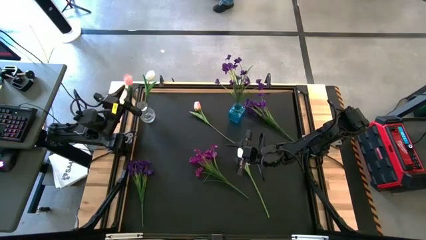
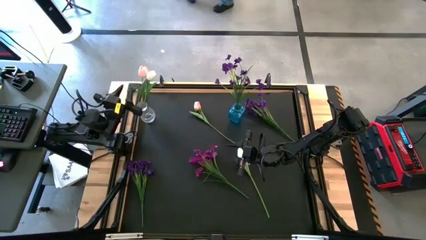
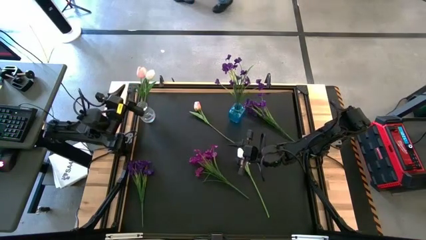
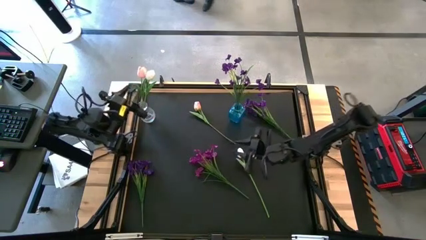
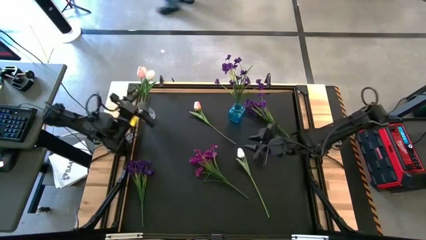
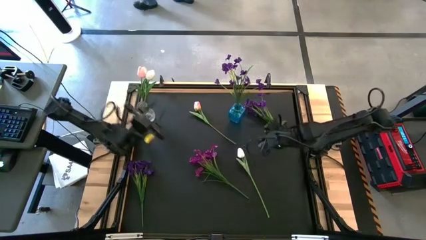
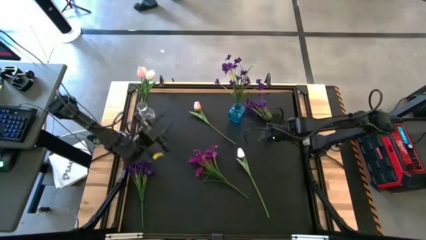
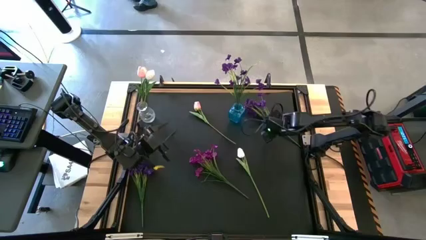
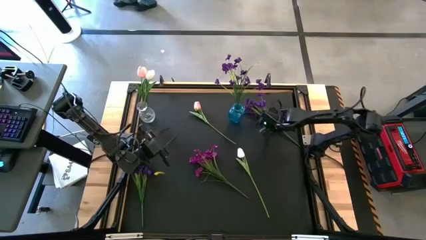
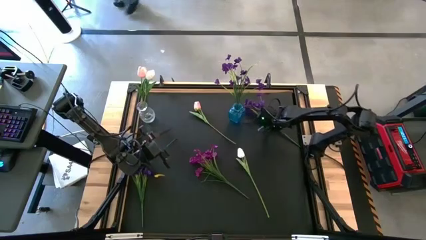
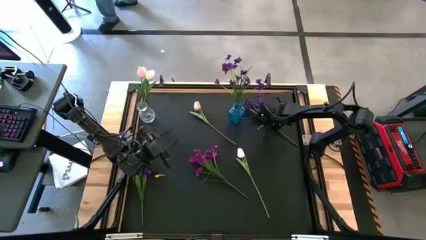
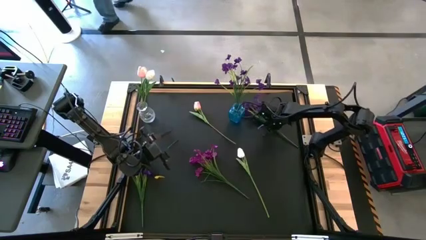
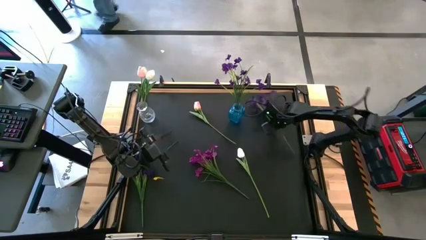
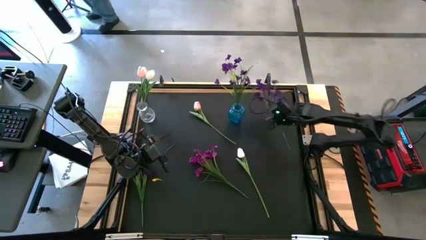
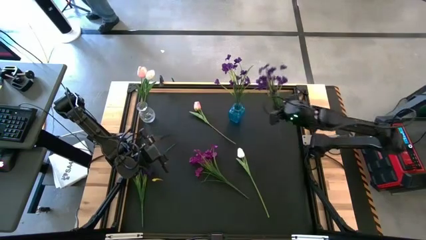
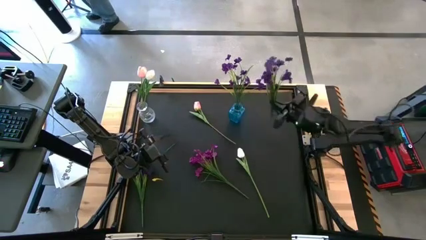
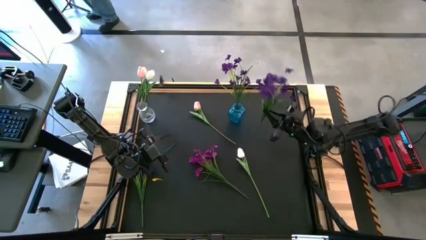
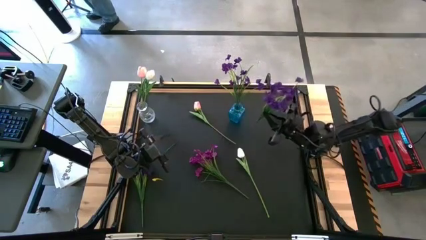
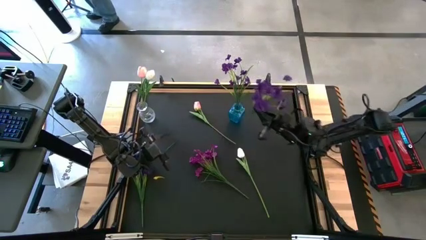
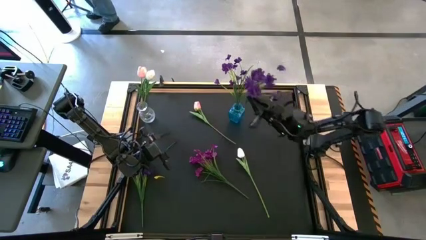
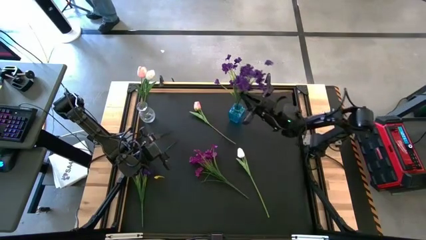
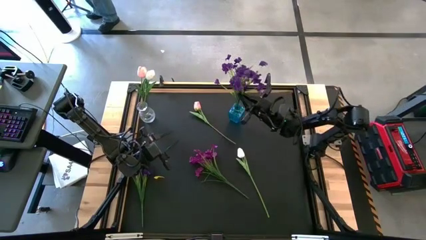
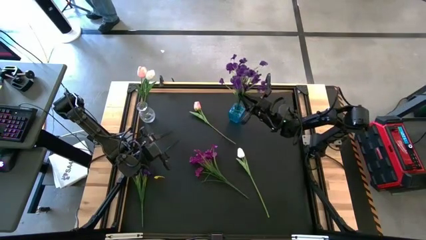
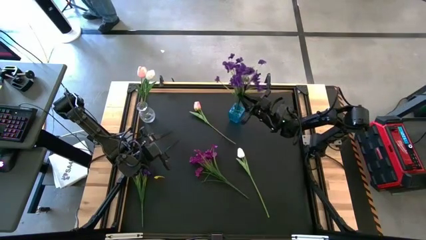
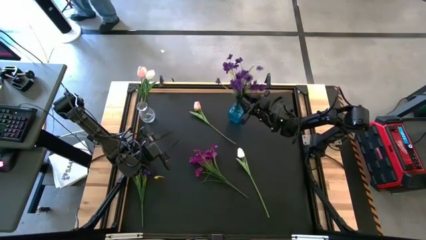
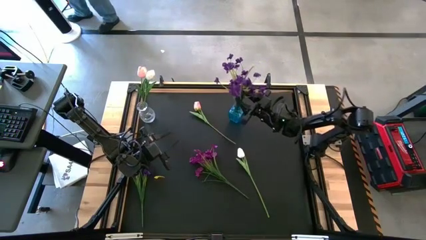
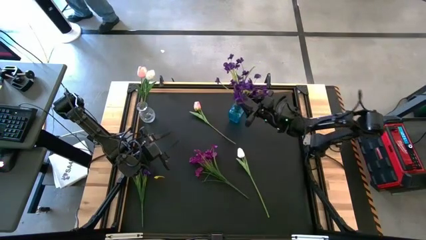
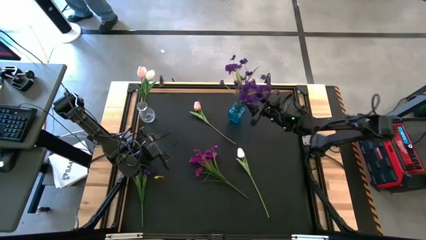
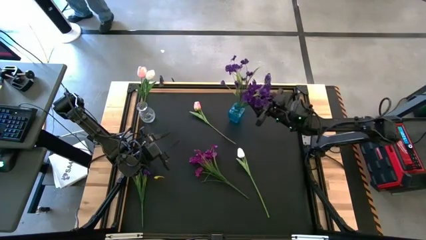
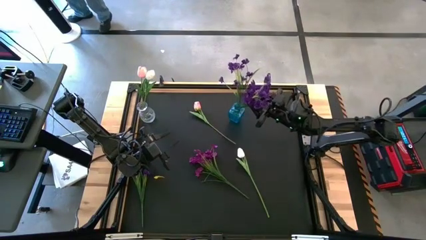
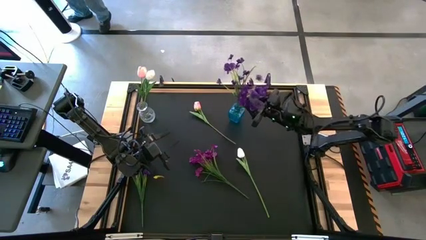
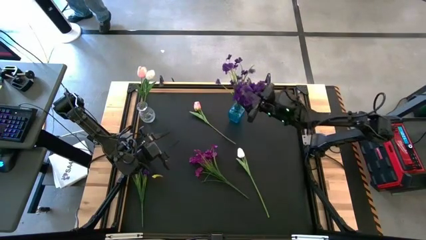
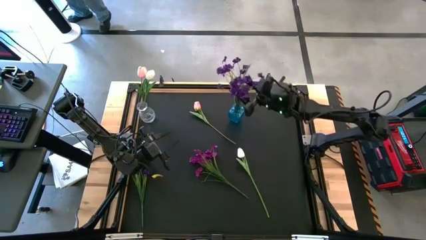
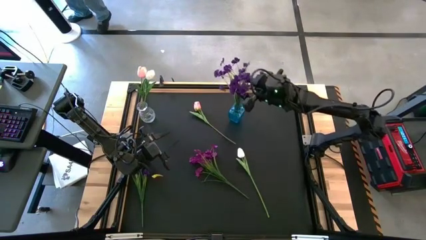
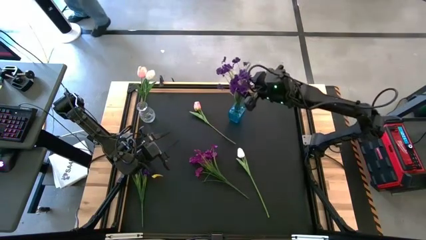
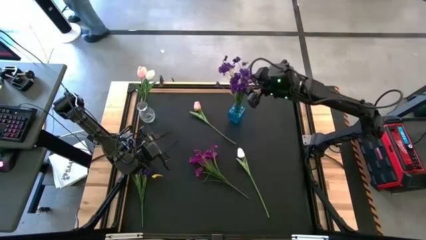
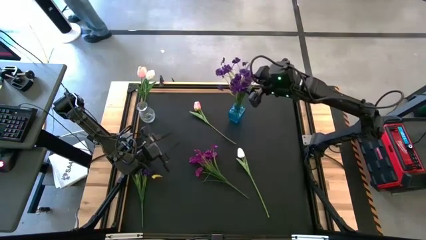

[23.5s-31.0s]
Task: Sort flowers into vase by color
Put the top violet flowers into the blue vase

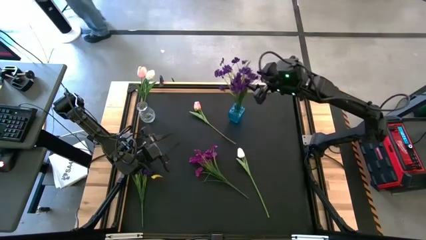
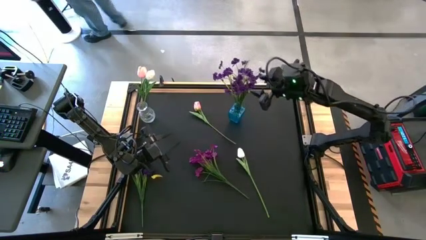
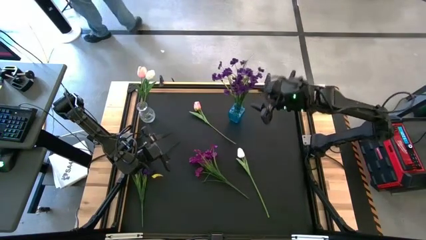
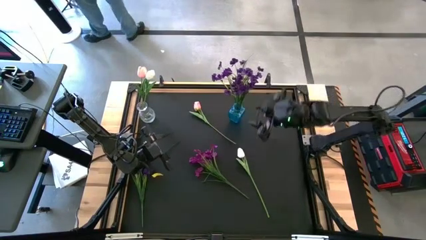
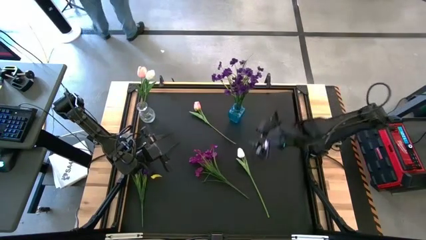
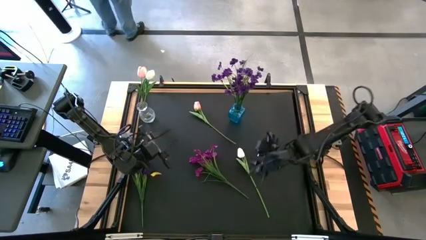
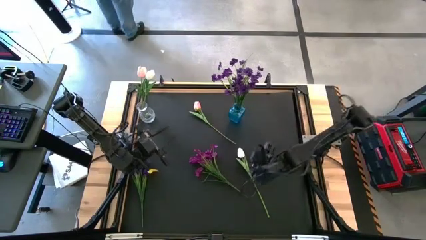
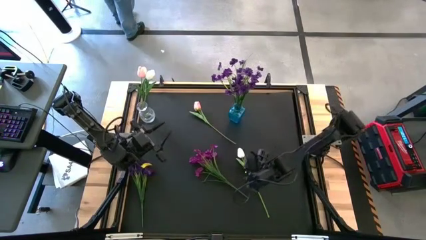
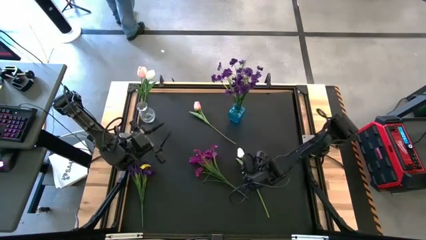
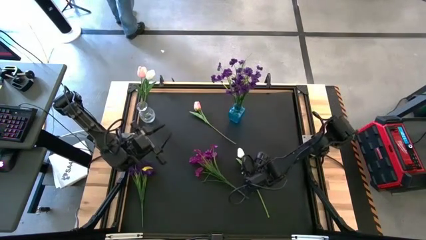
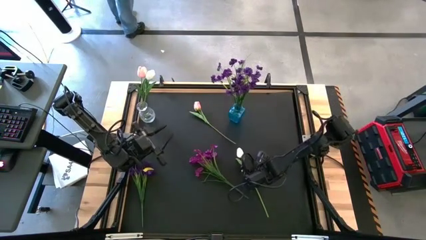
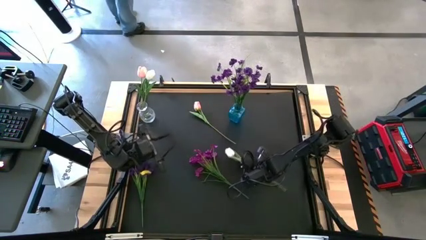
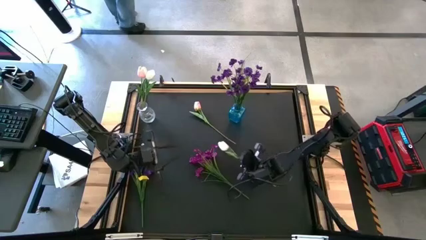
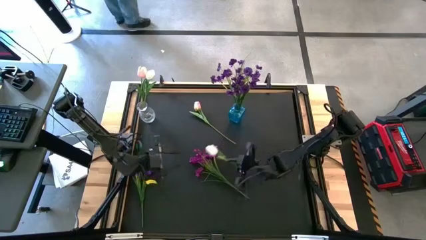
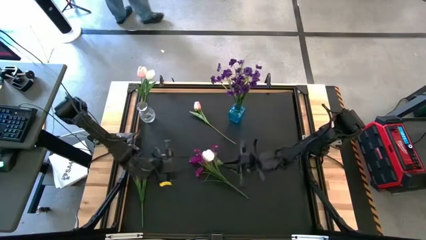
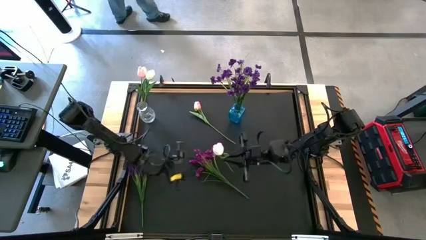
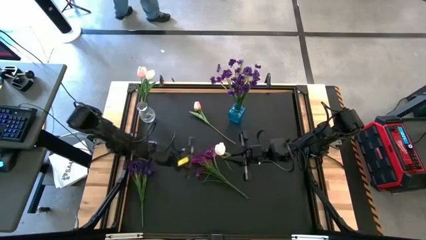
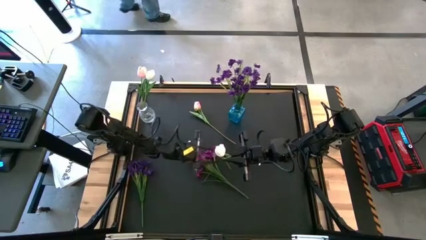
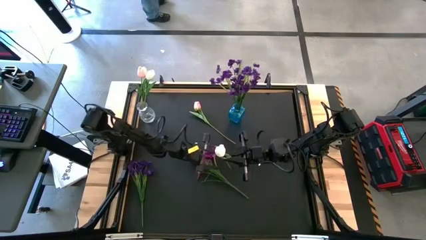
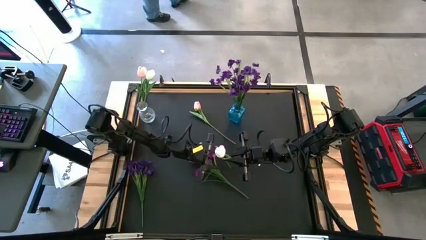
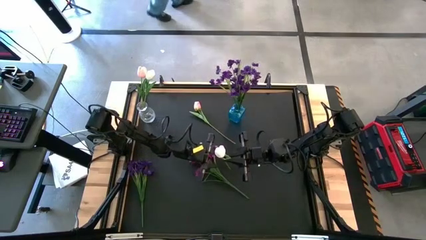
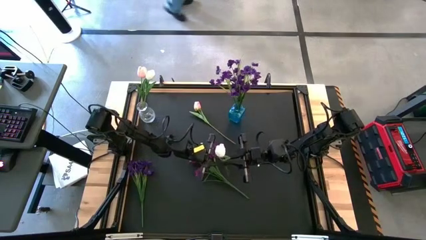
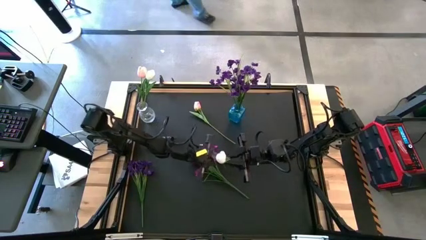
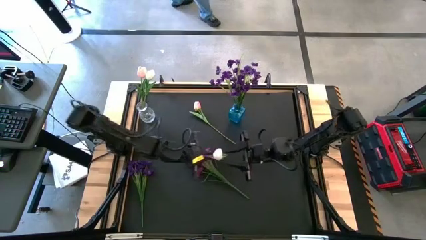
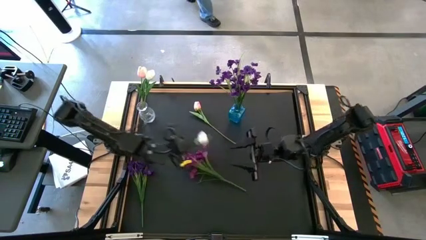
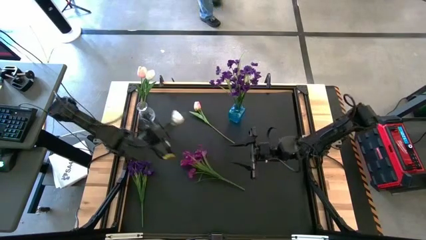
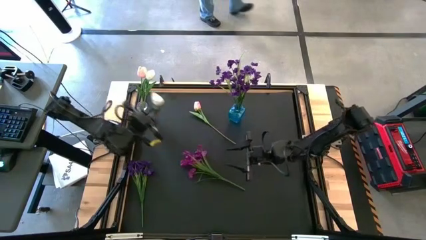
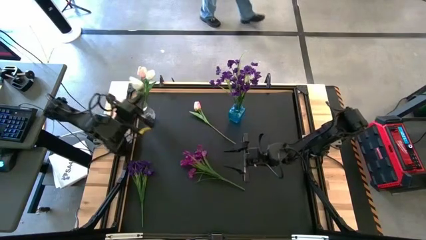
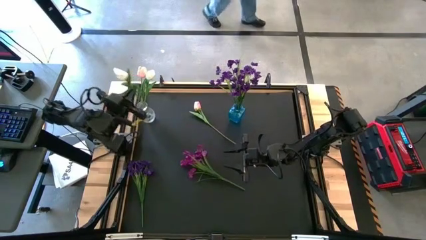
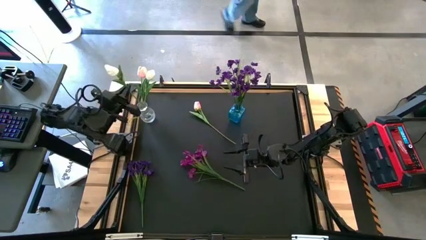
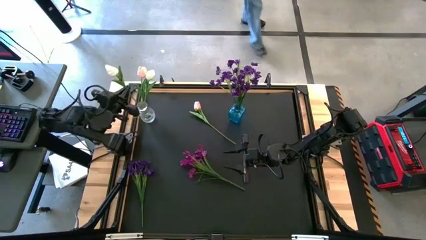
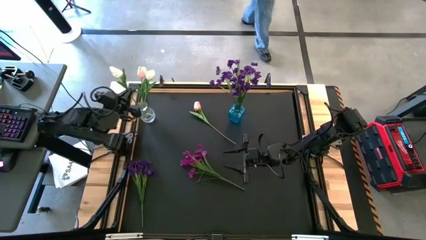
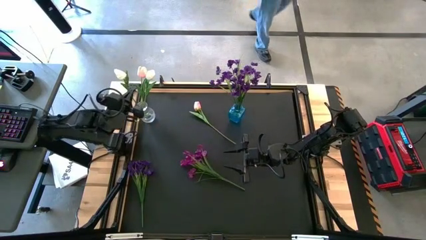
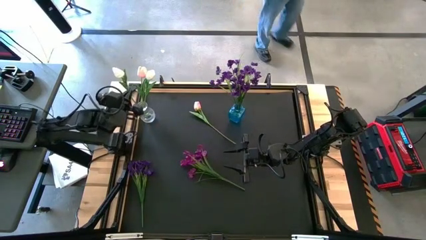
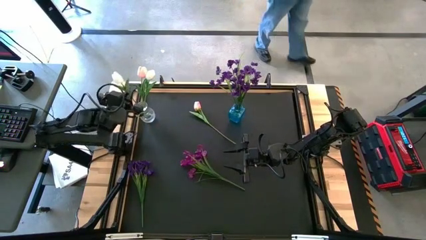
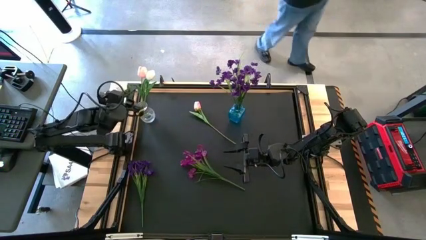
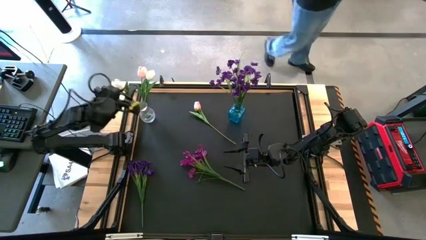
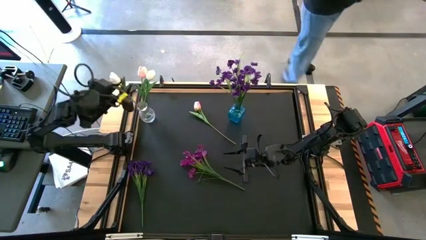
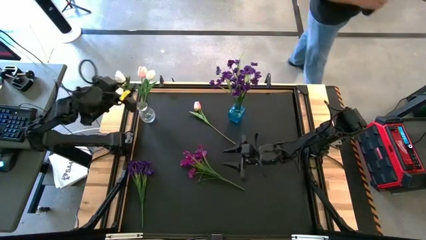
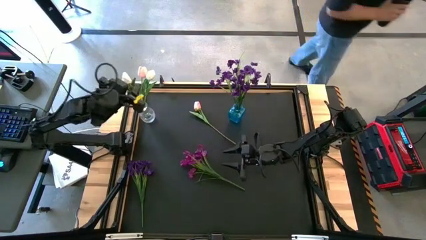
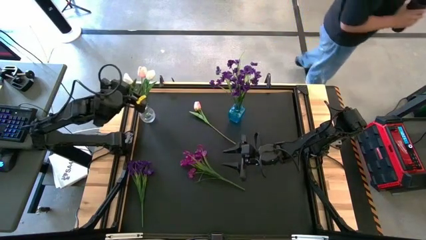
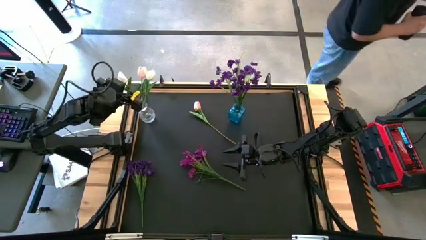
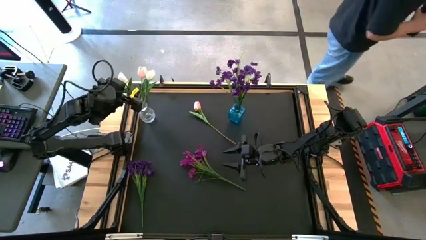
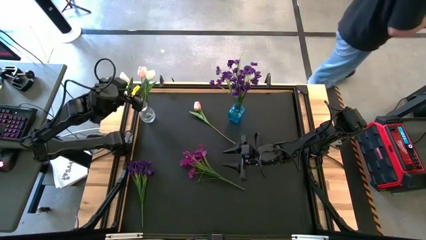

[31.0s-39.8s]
Put the white flower into the transparent vase
